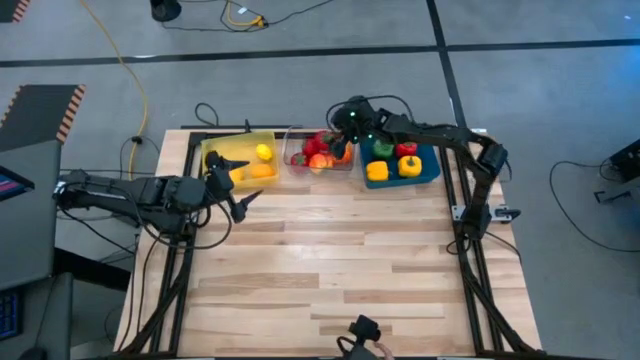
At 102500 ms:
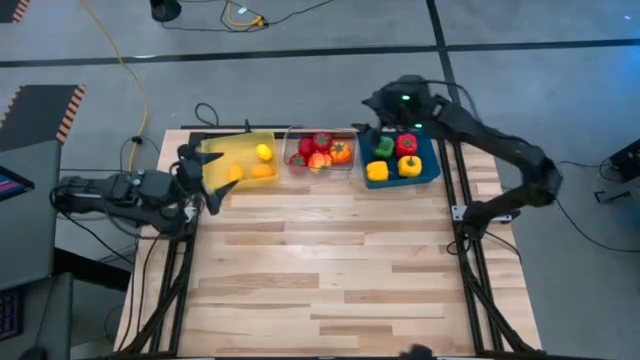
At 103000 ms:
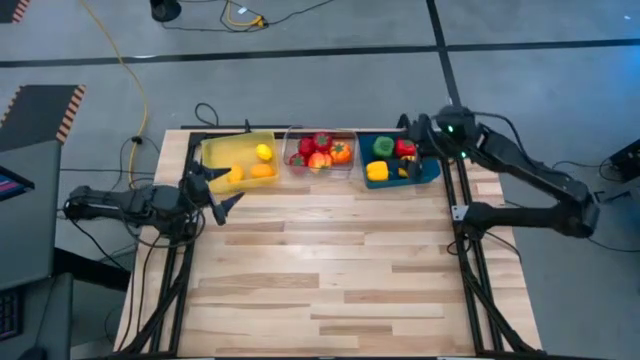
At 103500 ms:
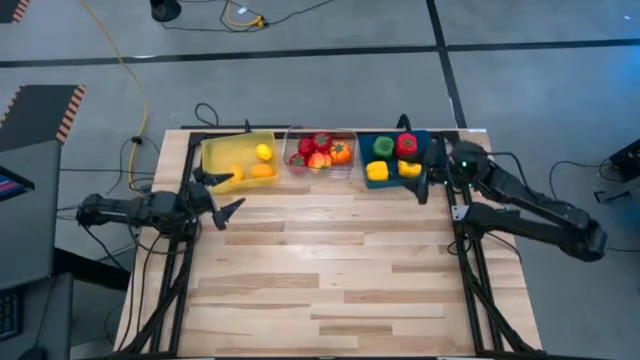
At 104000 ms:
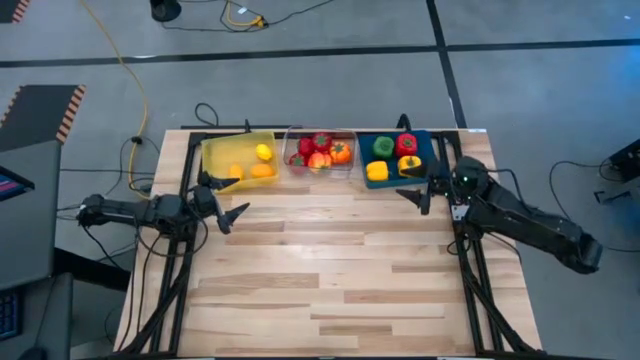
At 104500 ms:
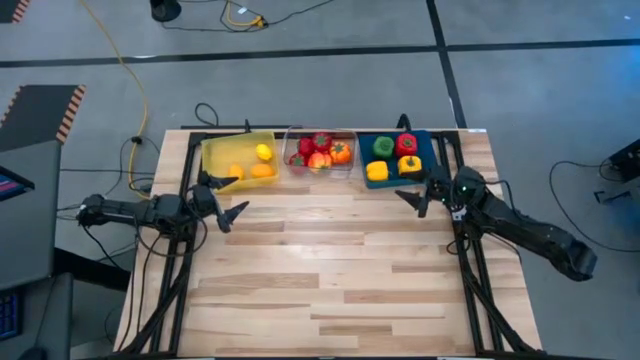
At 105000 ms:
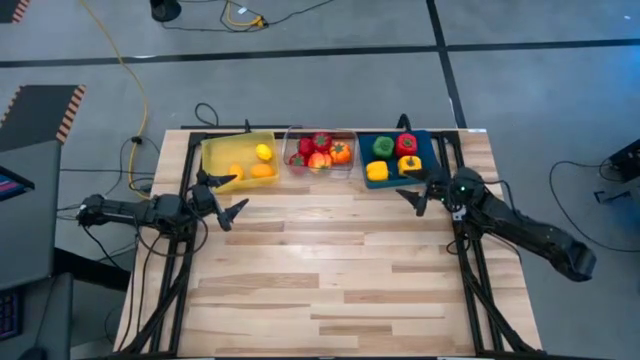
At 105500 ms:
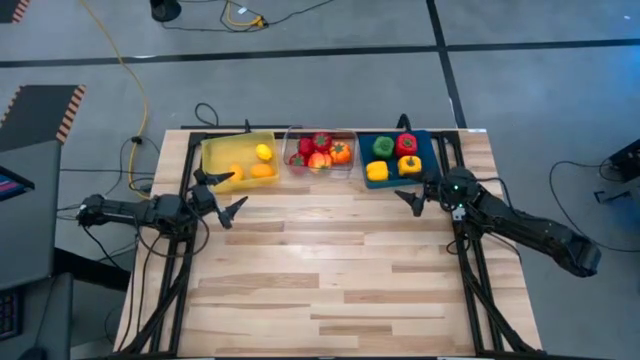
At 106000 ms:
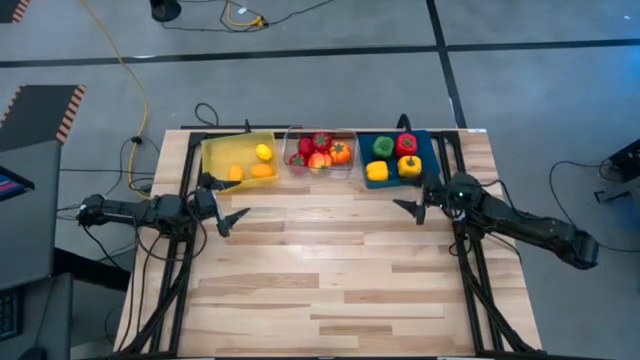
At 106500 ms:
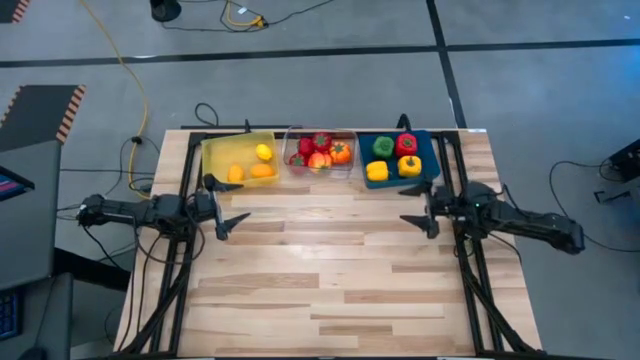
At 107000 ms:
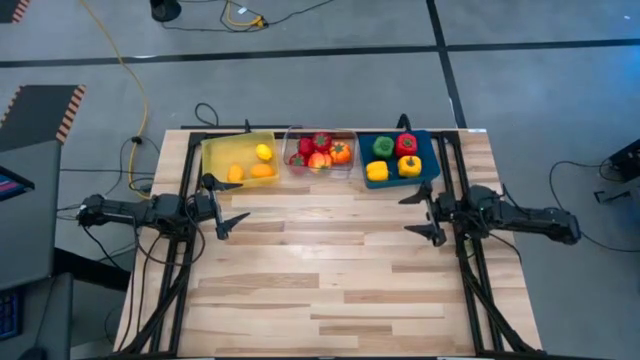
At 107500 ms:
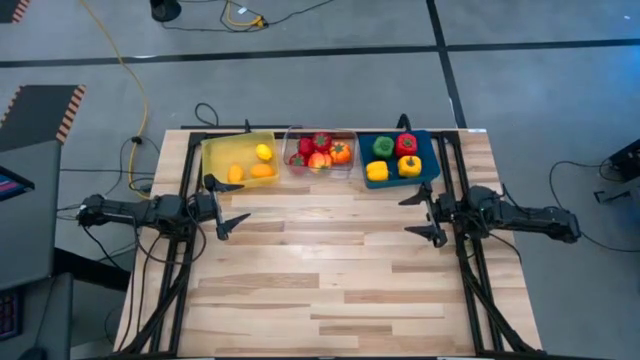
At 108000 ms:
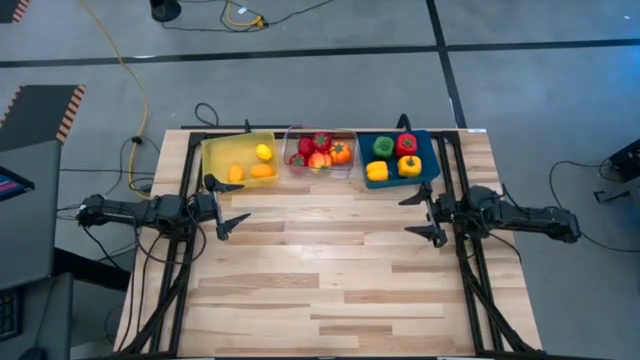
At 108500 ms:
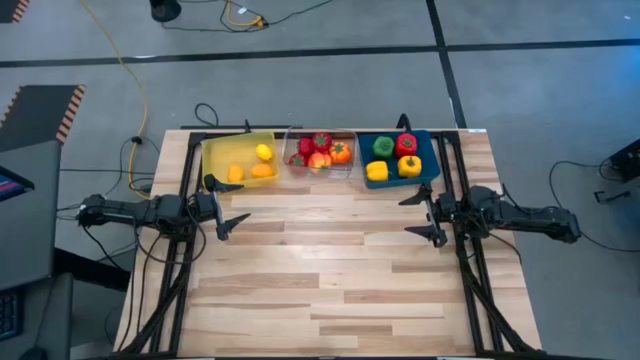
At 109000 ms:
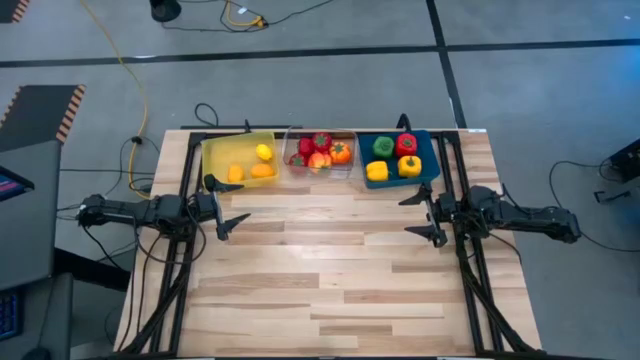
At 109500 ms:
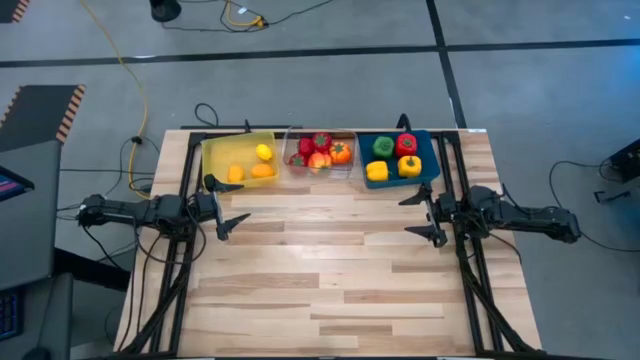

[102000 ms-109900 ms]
Task: Sort produce into baskets
Return to Home Position

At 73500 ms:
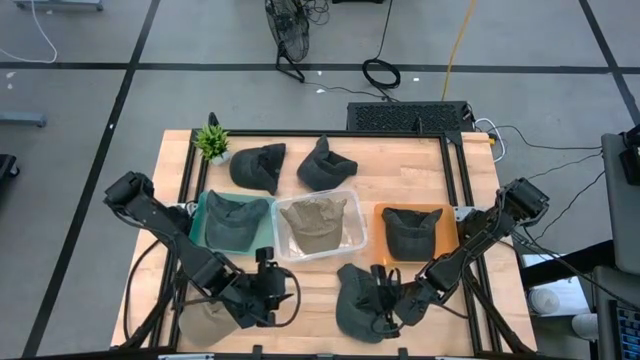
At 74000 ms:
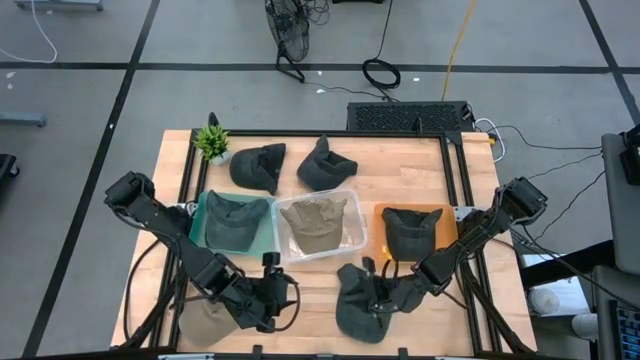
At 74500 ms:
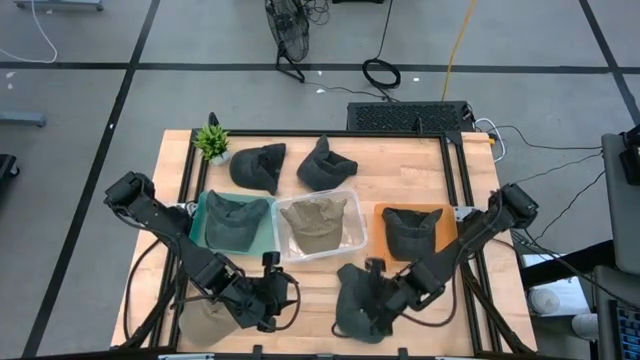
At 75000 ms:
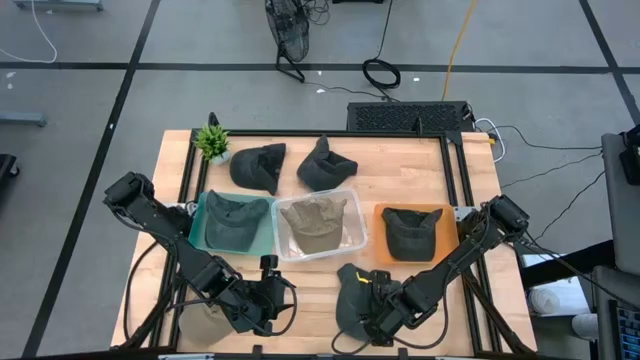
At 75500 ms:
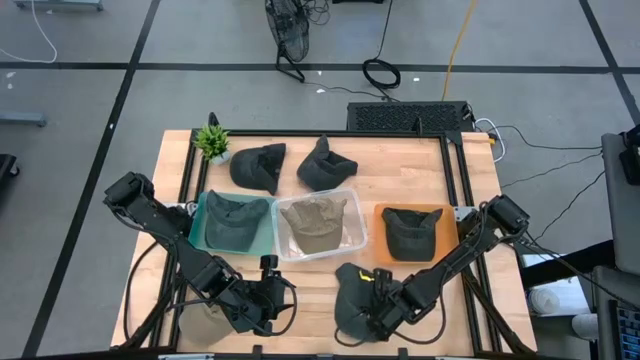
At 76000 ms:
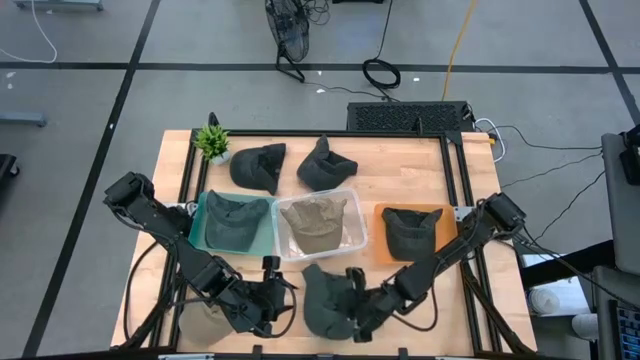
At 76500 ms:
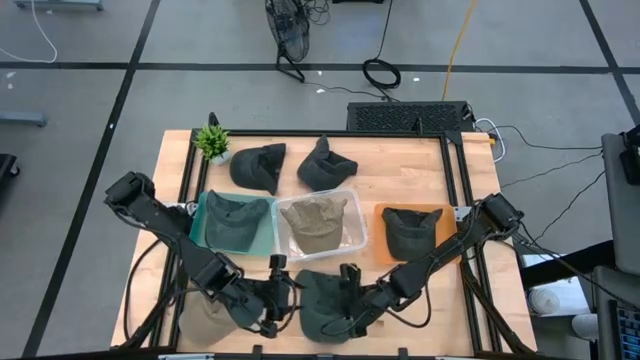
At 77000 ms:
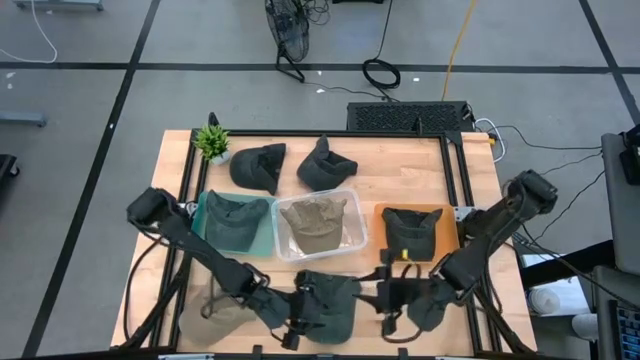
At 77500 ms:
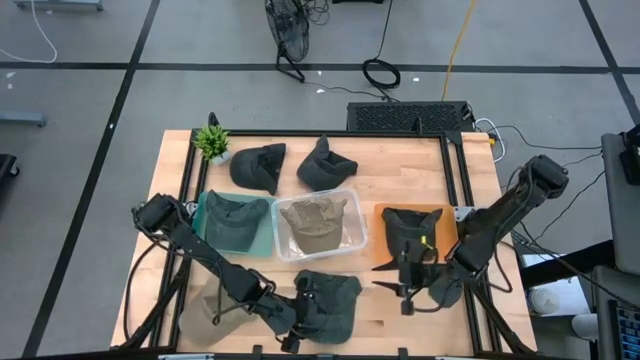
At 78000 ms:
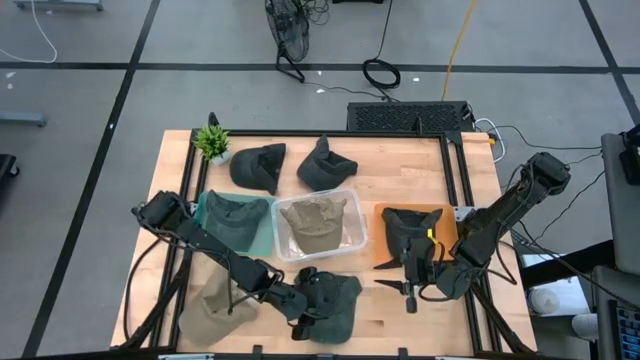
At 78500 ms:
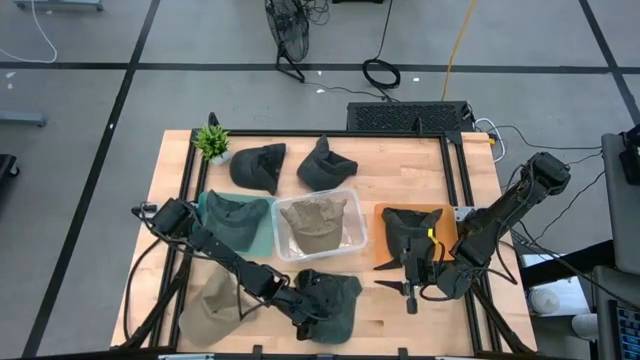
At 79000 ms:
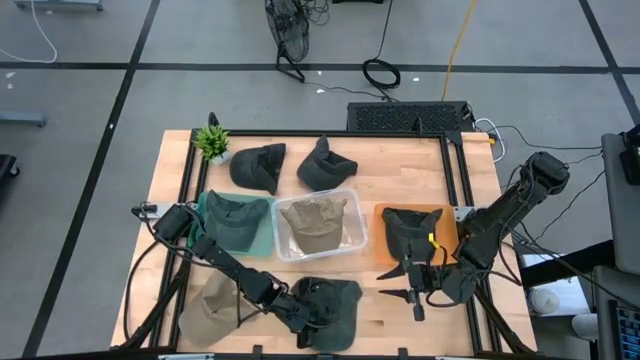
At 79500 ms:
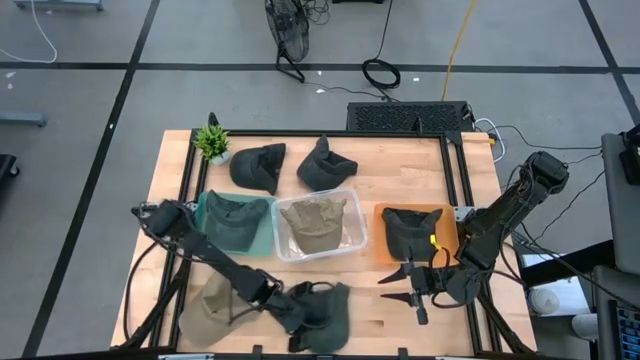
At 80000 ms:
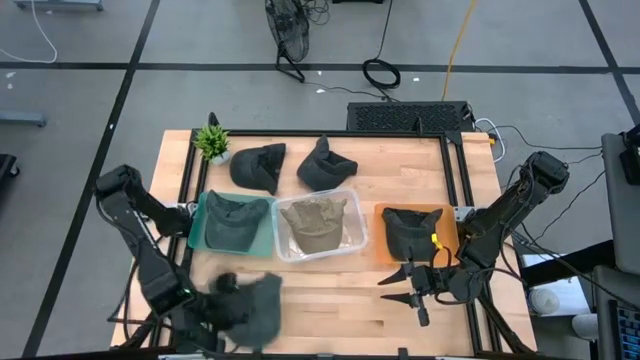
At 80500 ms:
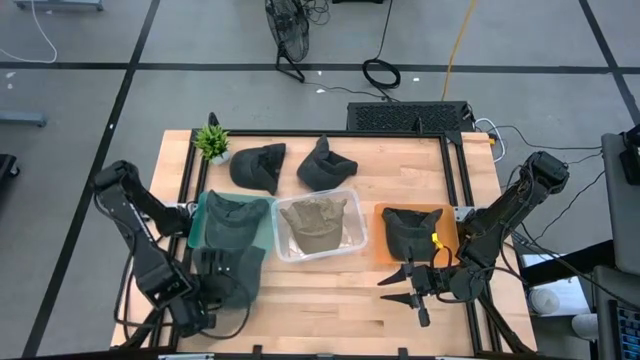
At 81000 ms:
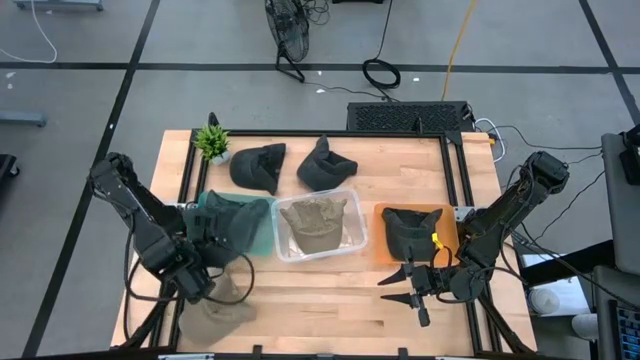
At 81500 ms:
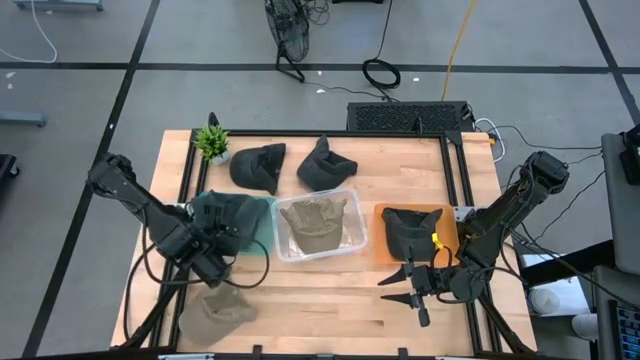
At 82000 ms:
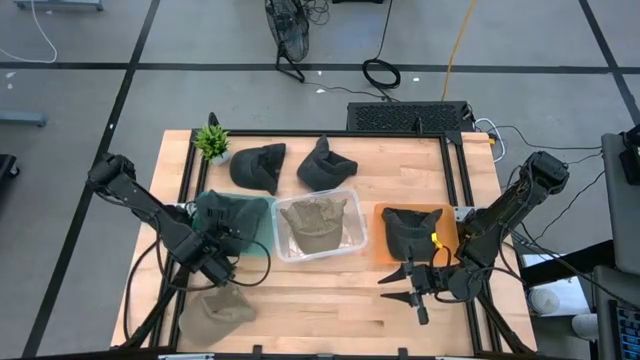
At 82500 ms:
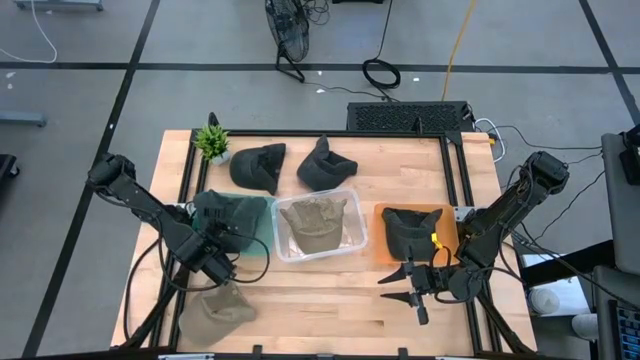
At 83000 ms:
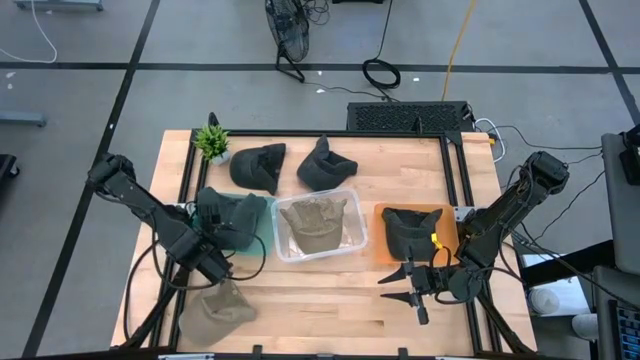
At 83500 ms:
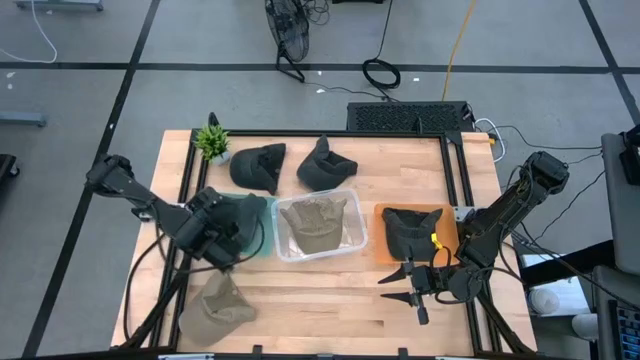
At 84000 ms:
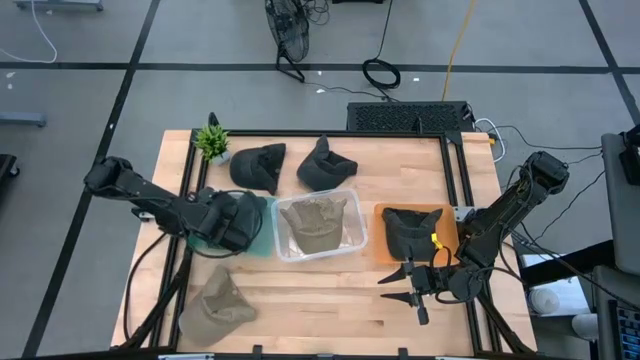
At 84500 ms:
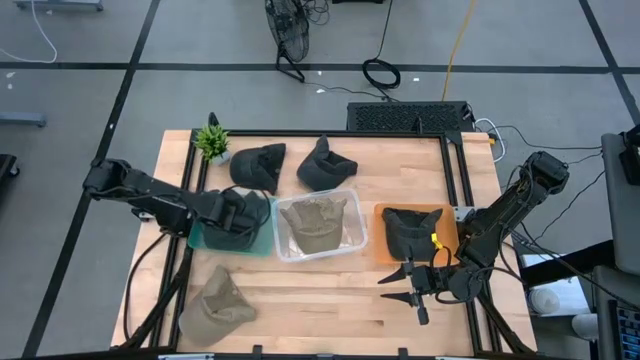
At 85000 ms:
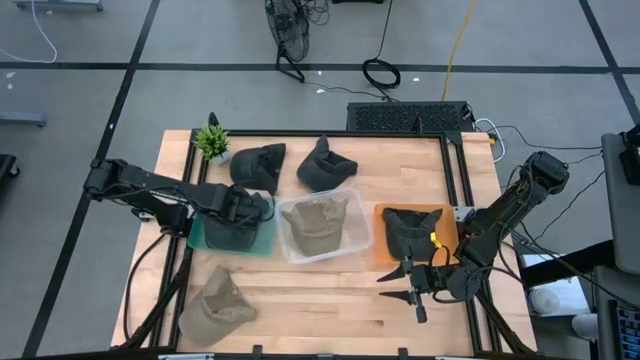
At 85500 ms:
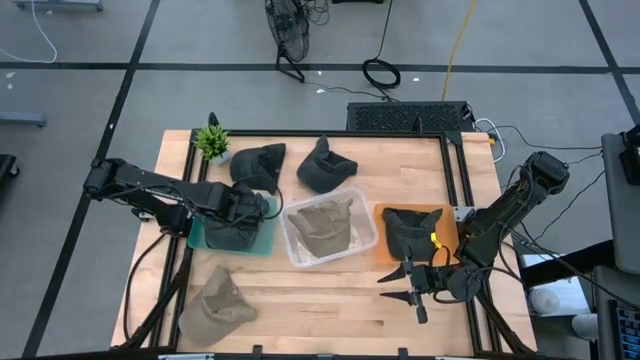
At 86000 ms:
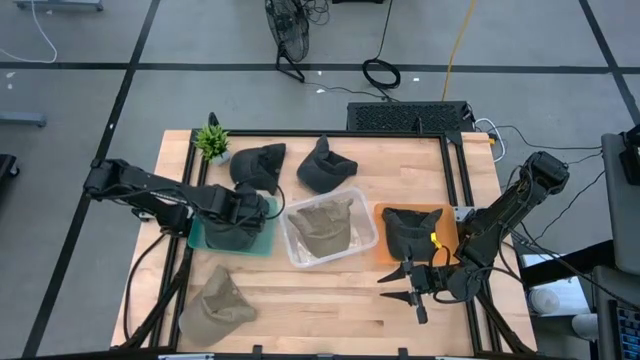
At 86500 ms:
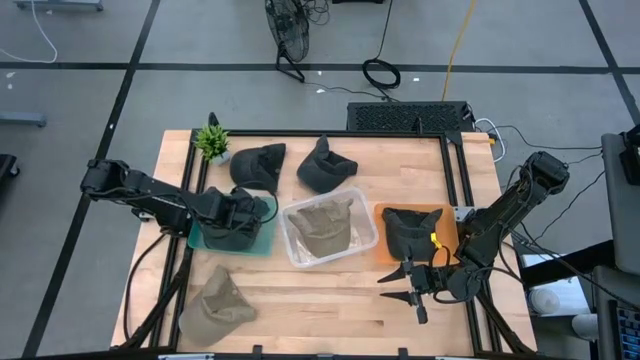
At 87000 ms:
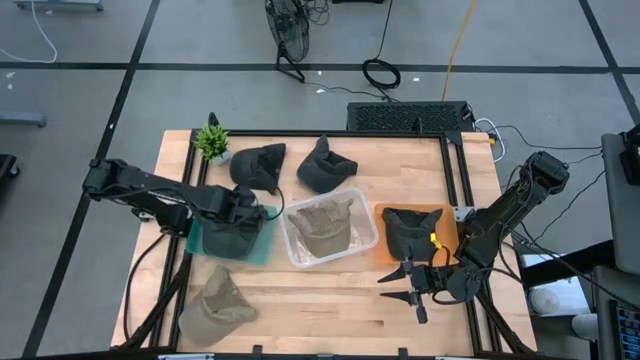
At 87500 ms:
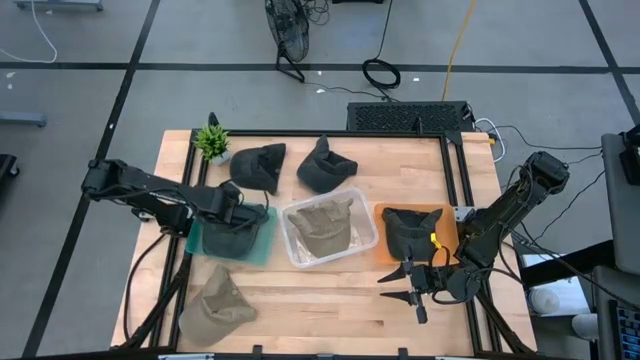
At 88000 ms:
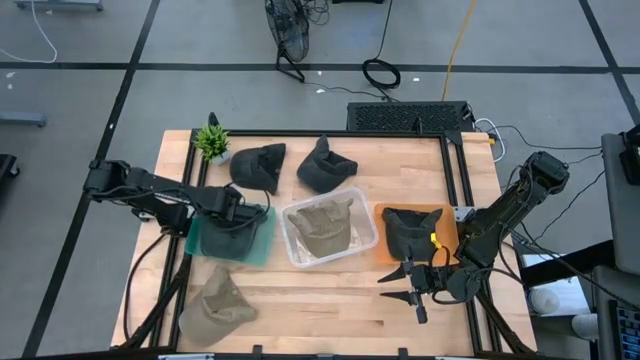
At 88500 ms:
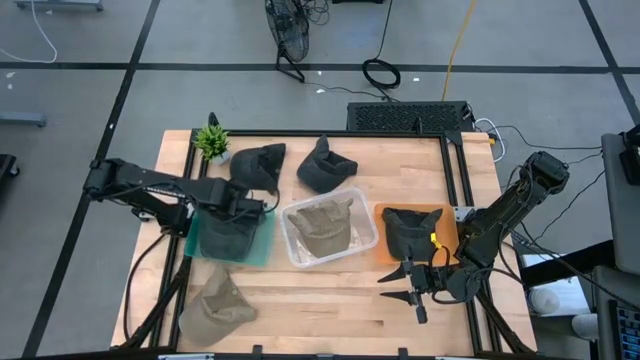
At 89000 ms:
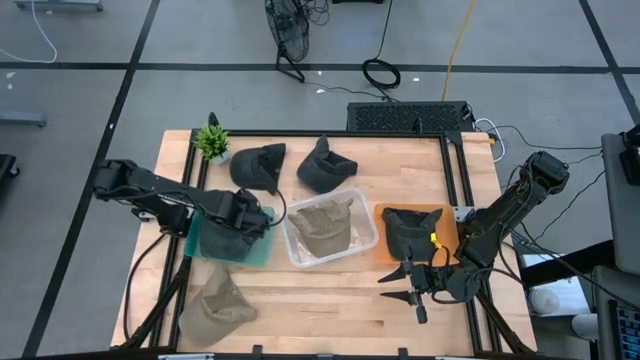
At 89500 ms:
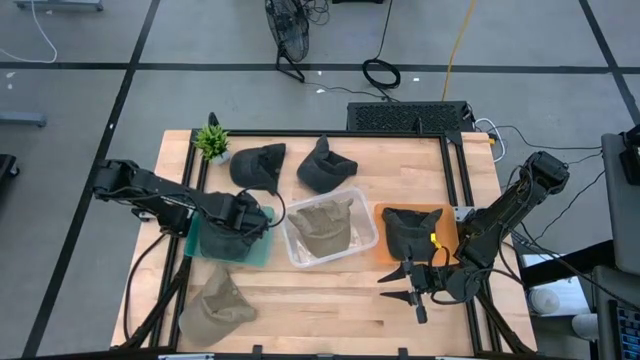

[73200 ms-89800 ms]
Task: Pick & Place hat
Put the green cap into the green bin
